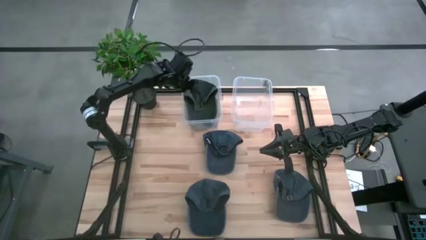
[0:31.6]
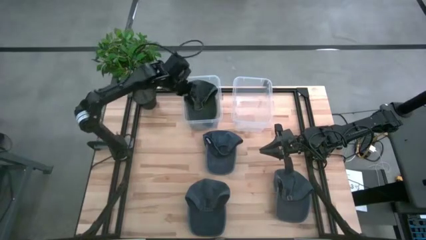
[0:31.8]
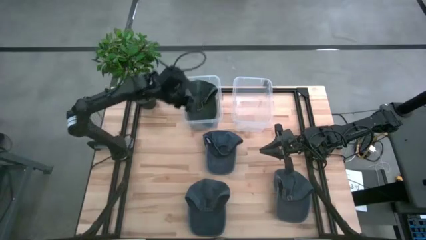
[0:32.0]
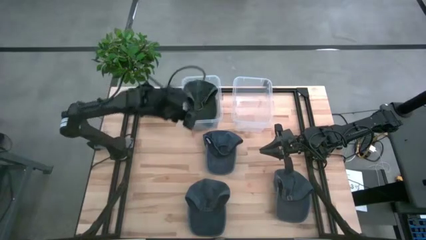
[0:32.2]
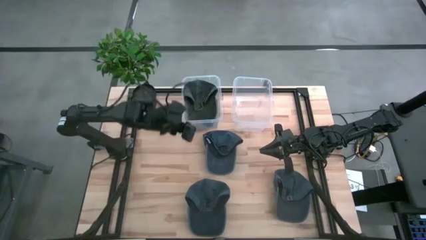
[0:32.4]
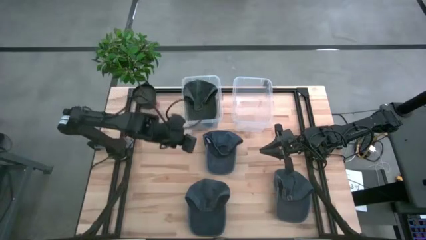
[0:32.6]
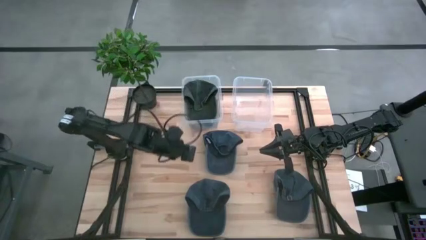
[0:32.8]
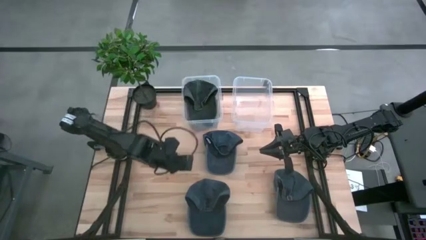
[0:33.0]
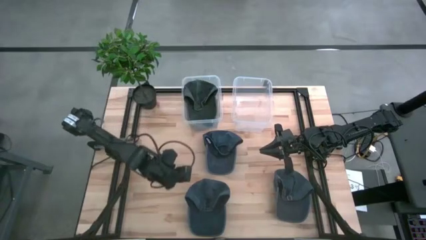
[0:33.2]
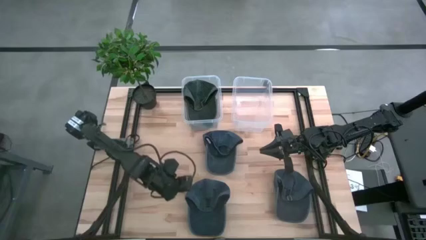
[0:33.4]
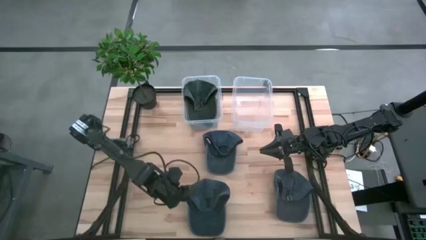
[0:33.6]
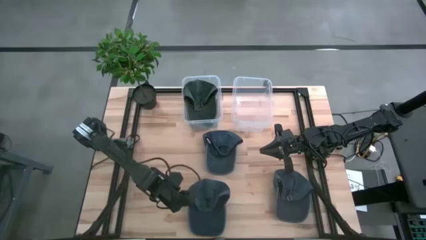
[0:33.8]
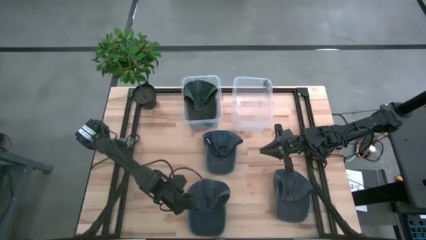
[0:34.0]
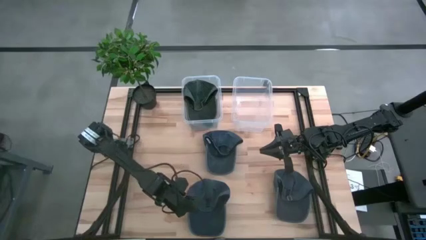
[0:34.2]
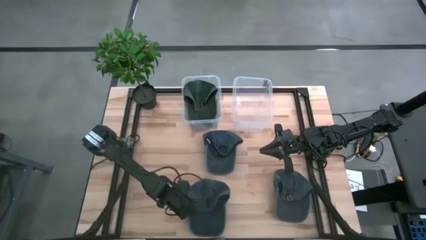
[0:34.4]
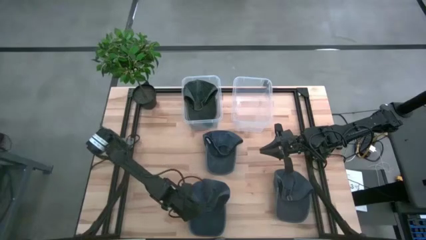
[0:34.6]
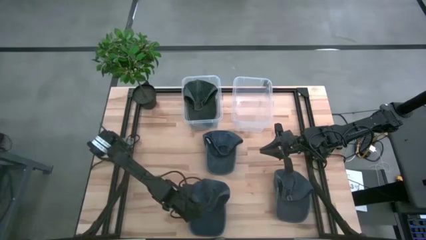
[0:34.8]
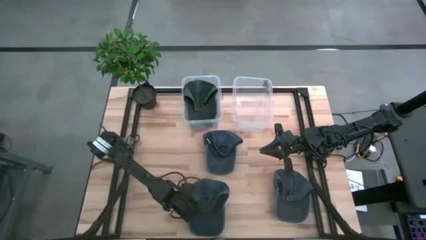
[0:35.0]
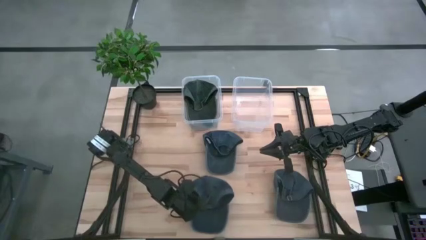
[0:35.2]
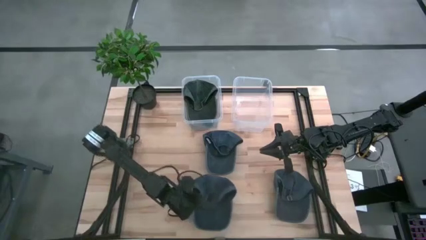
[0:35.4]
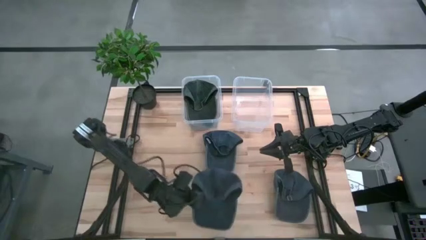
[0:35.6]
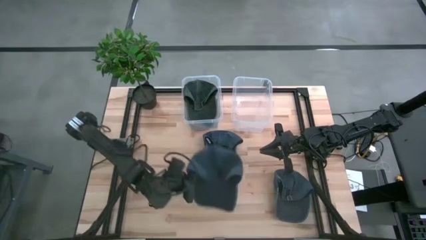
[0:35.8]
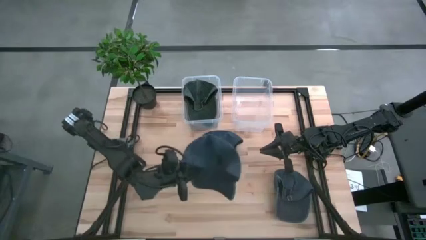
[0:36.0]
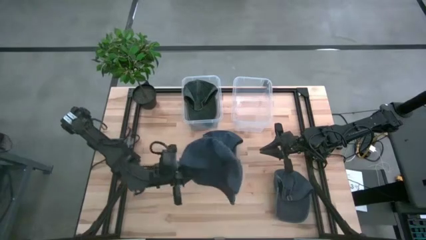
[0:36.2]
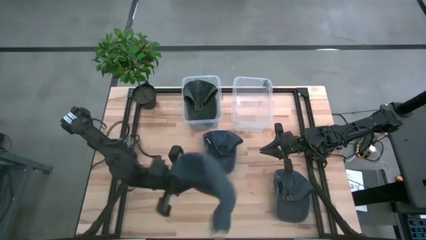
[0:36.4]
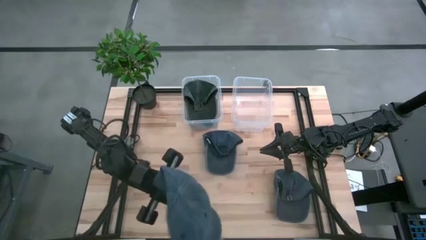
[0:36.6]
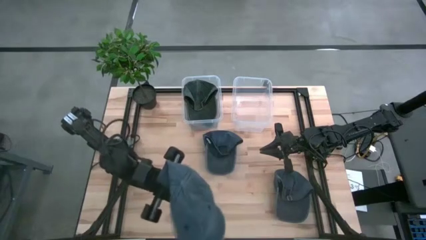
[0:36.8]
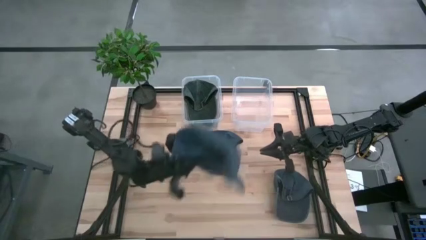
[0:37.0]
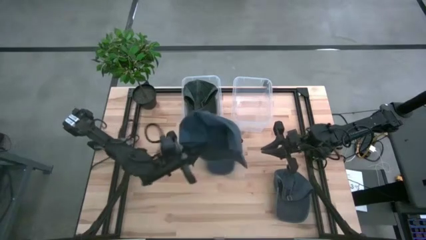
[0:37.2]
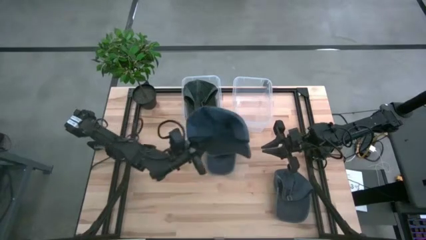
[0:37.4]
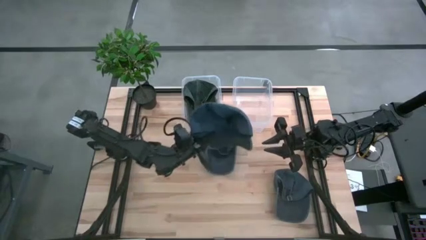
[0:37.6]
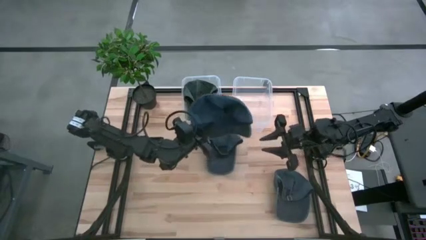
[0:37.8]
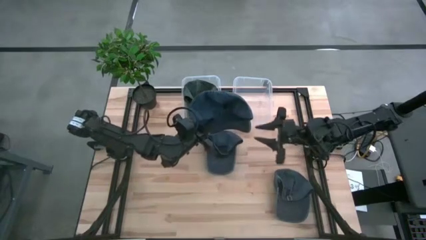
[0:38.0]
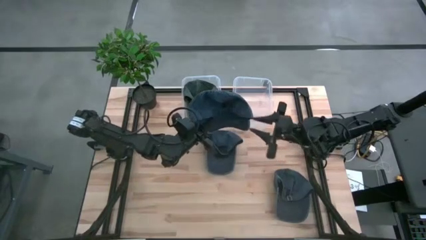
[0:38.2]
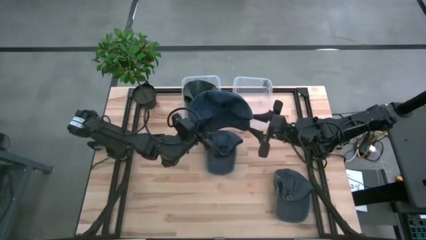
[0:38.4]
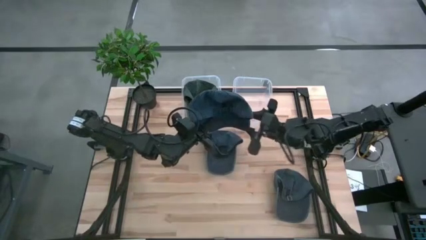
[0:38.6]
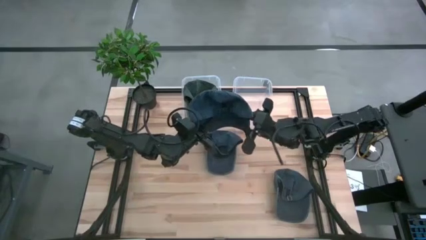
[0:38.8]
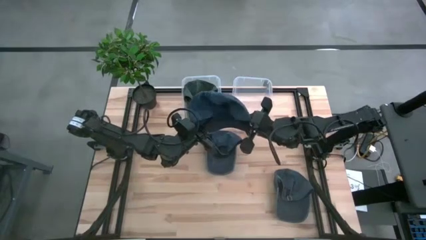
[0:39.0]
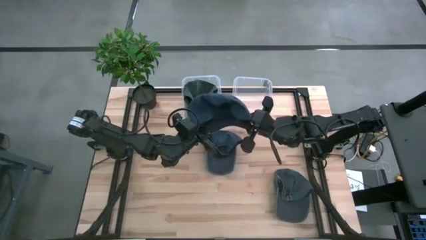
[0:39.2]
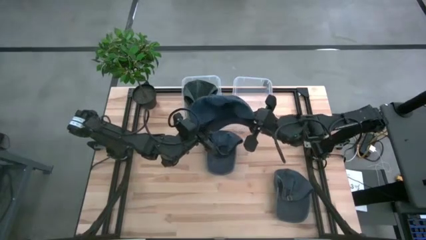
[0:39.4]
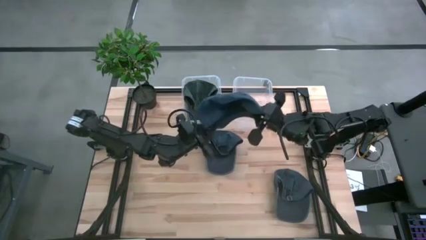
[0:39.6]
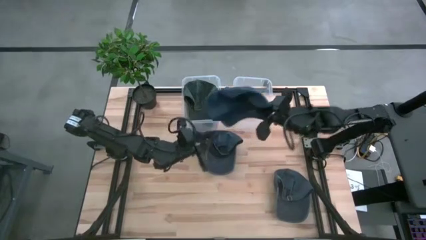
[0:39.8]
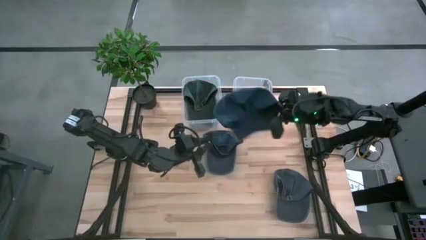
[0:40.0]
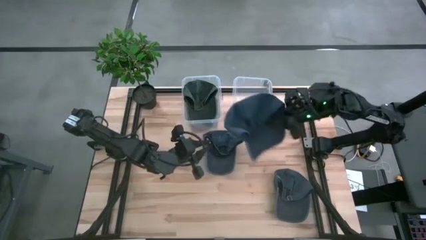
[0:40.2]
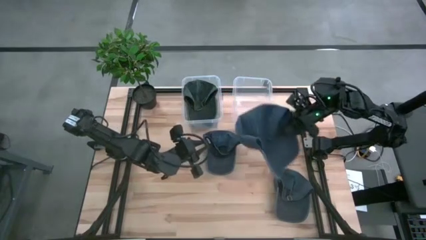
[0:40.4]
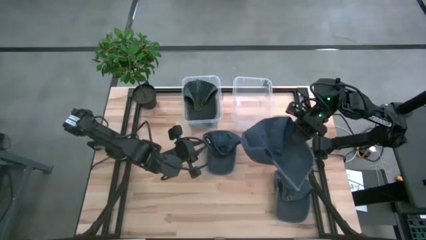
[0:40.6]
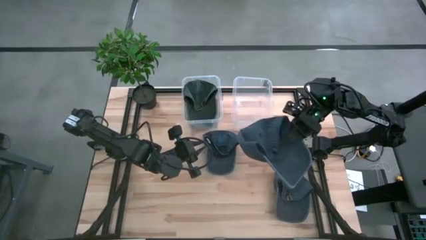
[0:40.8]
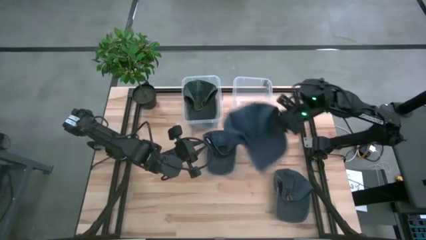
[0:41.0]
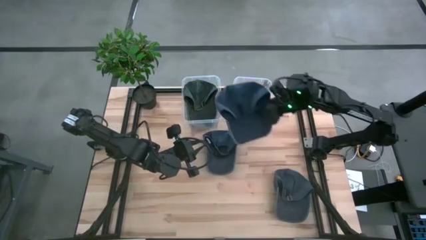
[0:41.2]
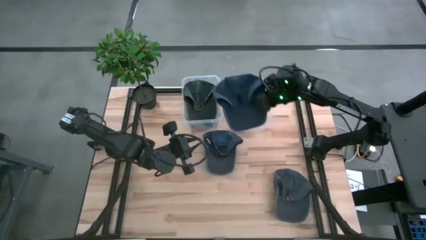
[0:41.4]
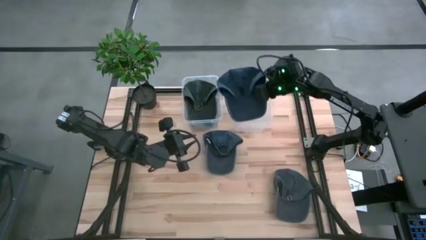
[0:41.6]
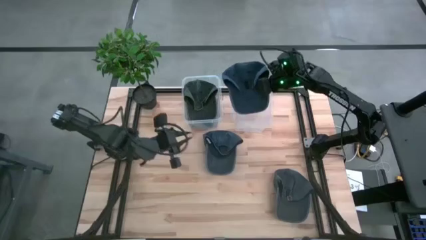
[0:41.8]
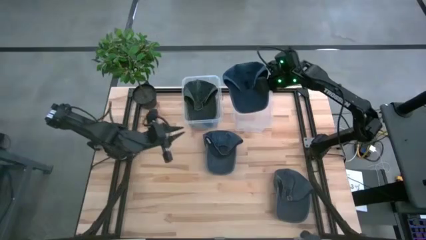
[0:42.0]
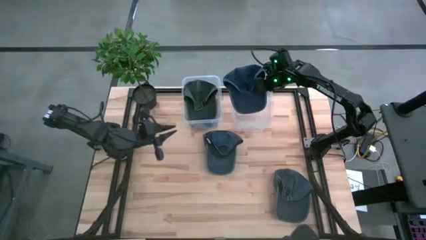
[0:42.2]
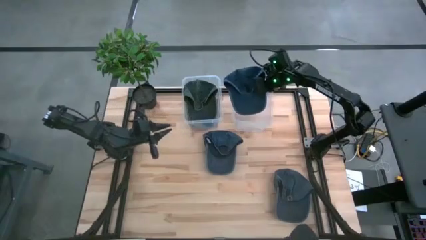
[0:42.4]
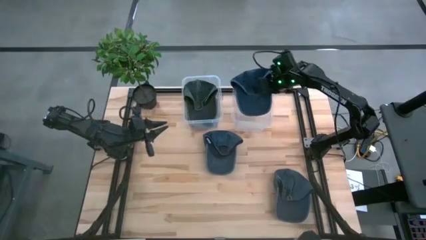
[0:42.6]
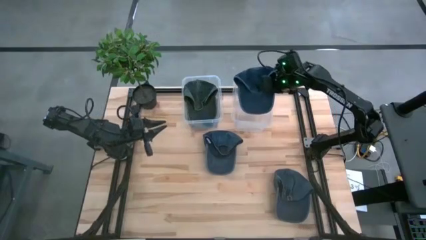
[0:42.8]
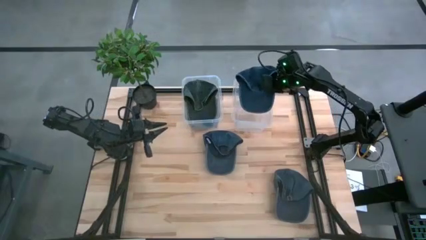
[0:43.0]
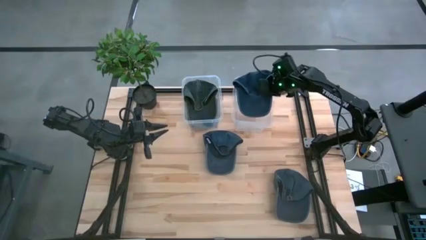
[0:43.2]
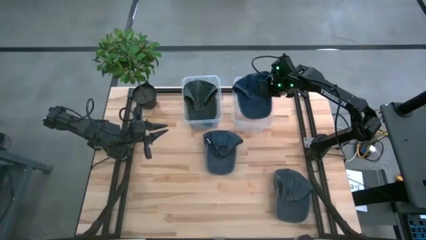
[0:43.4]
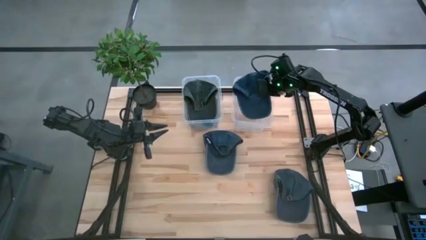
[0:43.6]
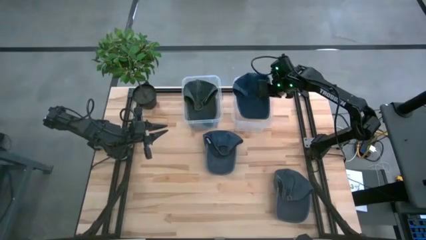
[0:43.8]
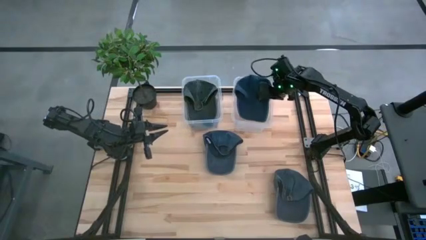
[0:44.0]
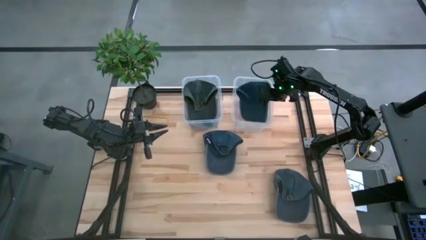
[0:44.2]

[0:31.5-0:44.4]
Task: Pick & Place hat
Put the bottom blue cap into the right transparent bin

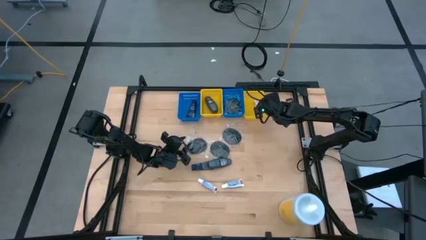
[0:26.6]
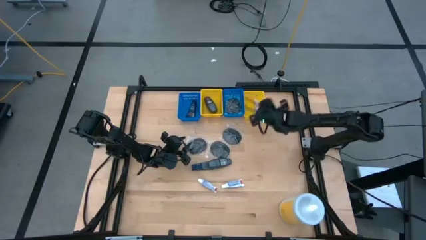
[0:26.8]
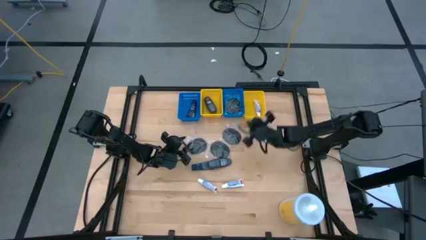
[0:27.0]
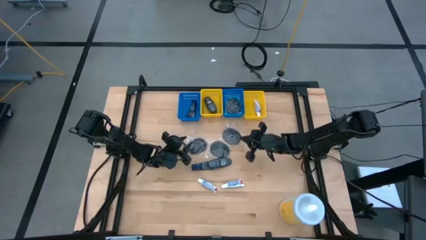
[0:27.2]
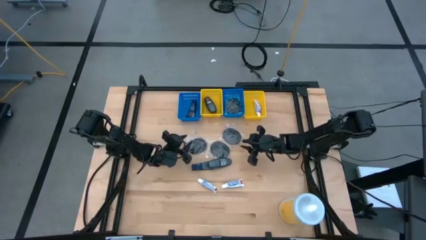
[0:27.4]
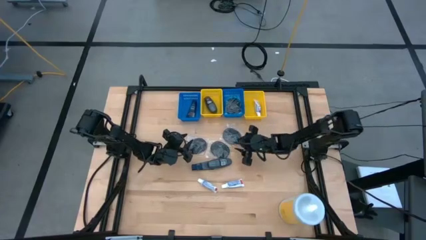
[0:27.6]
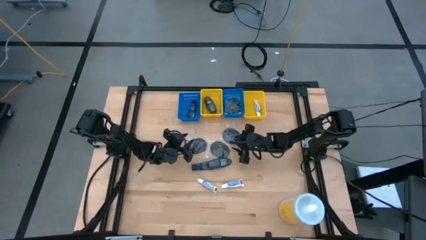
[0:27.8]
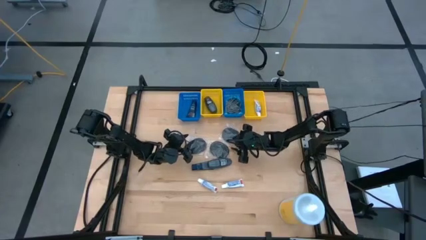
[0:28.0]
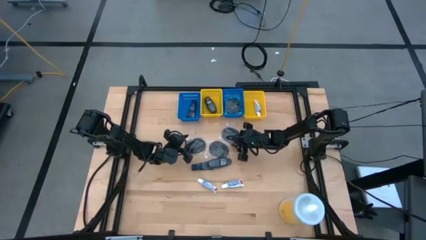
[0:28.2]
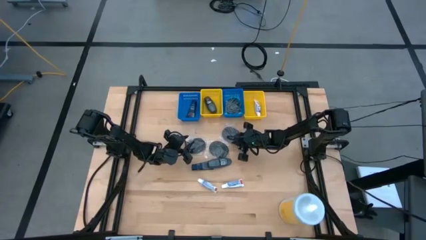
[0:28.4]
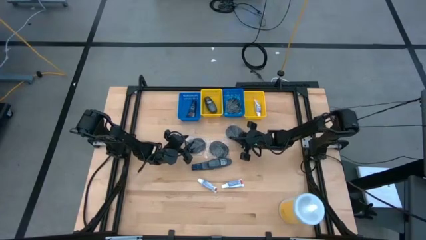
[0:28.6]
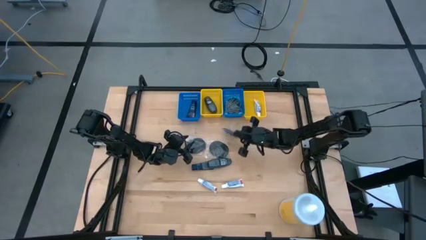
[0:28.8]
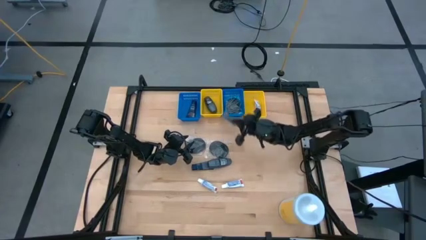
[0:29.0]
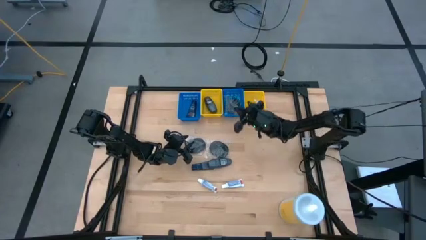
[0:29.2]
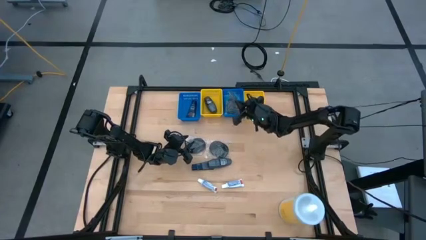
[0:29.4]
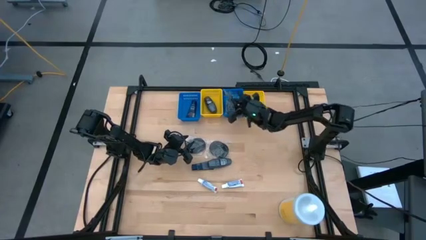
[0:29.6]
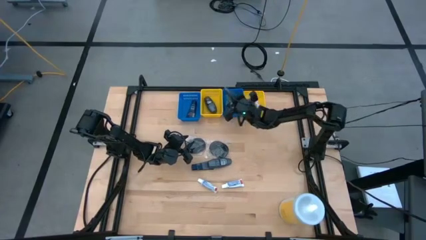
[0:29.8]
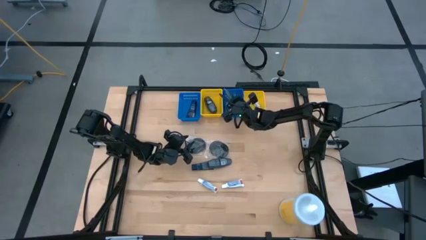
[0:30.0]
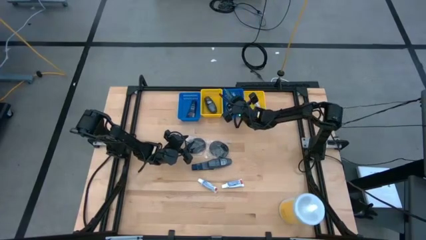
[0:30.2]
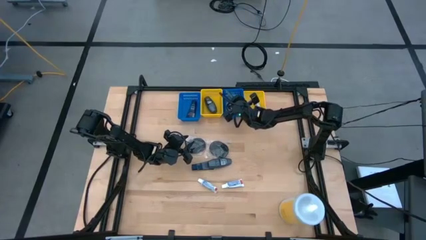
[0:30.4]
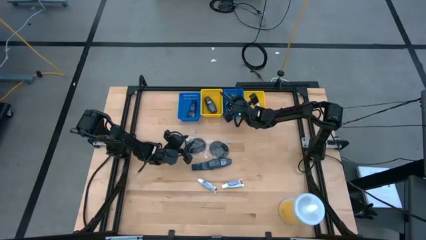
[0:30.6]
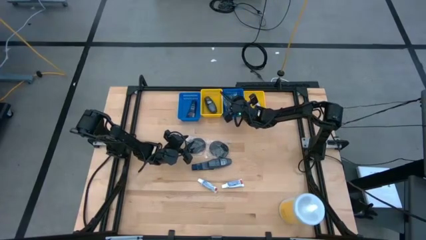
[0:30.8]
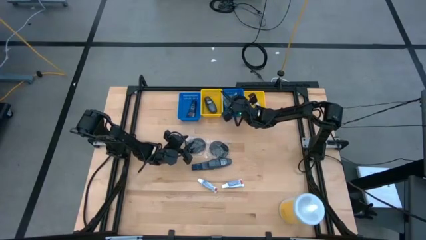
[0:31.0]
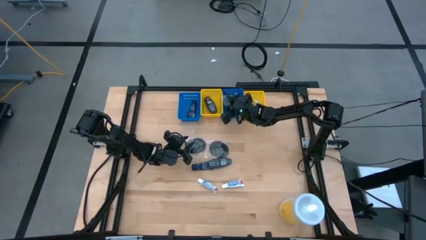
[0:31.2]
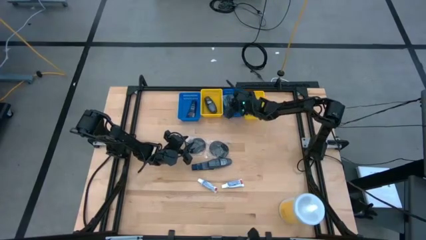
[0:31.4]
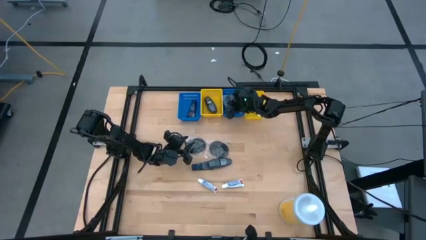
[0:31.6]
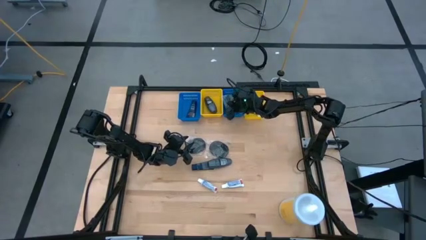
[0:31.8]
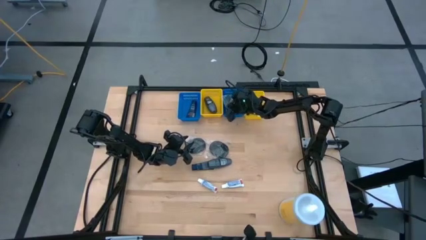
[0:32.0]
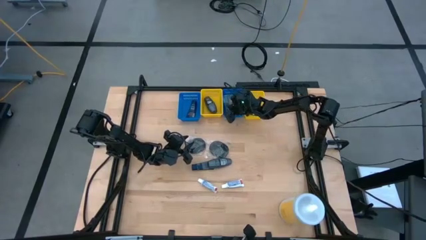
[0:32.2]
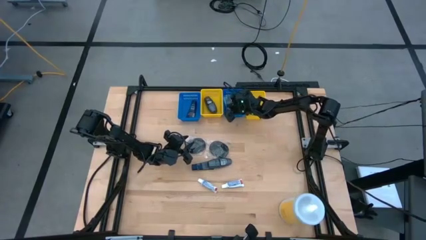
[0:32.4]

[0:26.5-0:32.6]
Task: Pick & Place Travel size toiletries
Put the black hairbrush into the right blue bin
